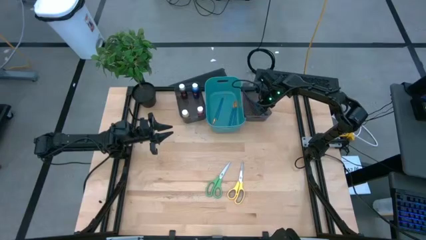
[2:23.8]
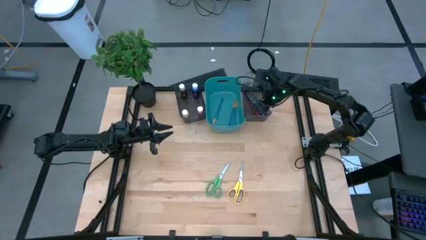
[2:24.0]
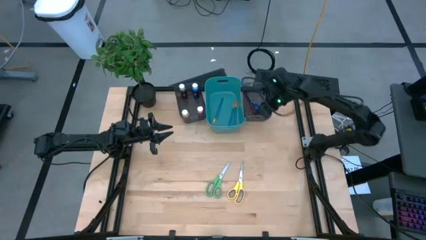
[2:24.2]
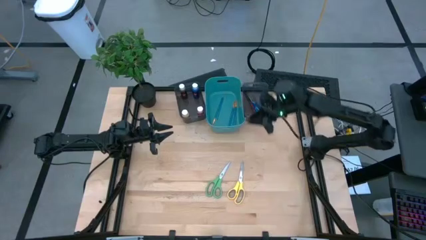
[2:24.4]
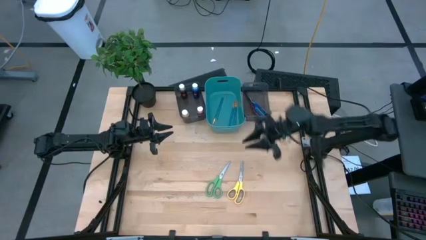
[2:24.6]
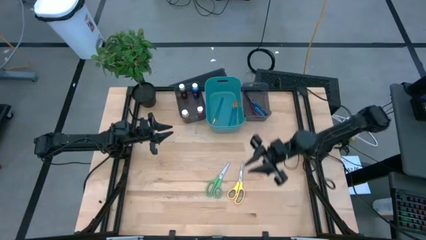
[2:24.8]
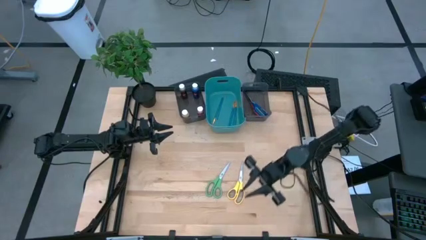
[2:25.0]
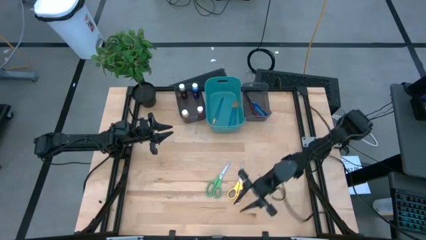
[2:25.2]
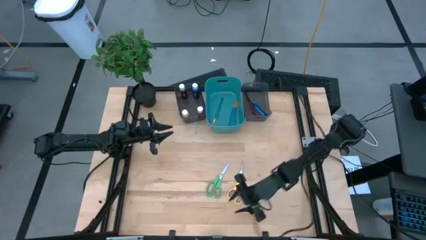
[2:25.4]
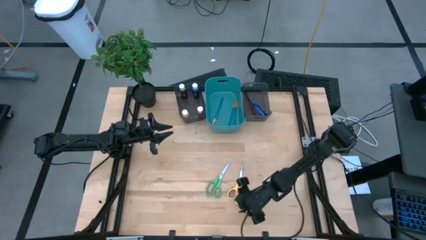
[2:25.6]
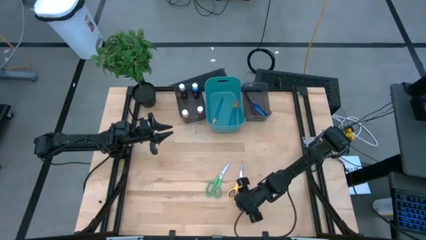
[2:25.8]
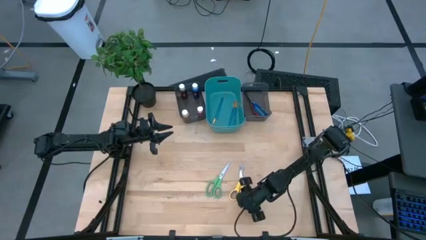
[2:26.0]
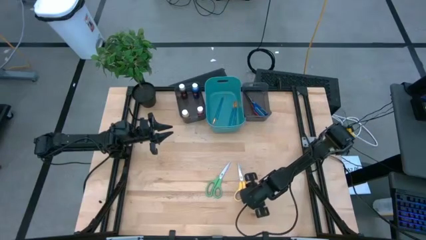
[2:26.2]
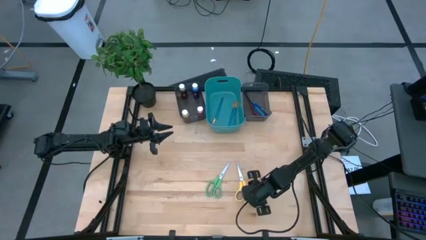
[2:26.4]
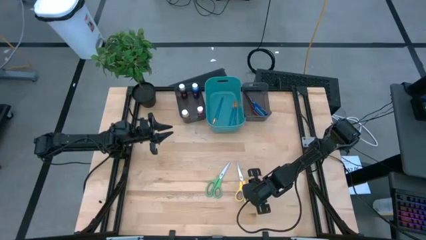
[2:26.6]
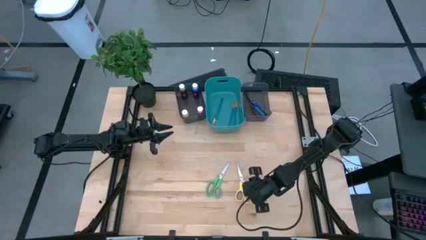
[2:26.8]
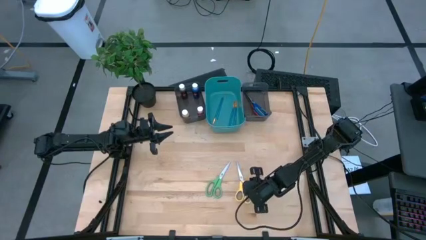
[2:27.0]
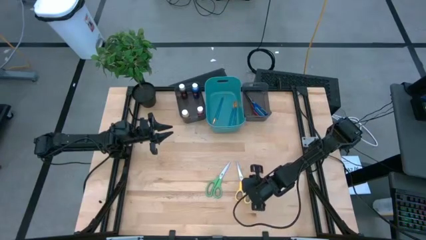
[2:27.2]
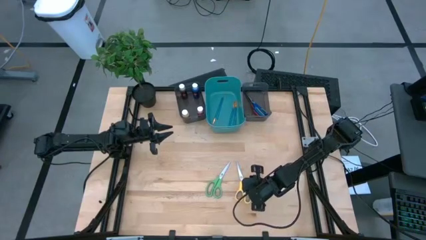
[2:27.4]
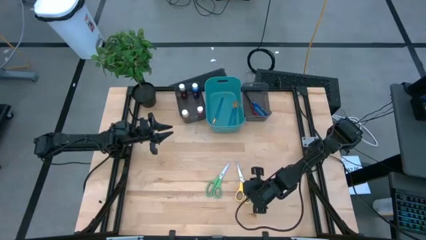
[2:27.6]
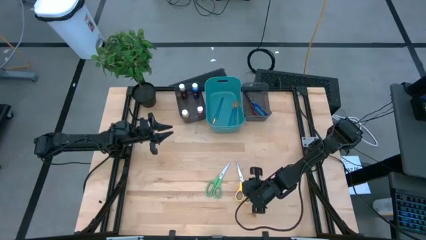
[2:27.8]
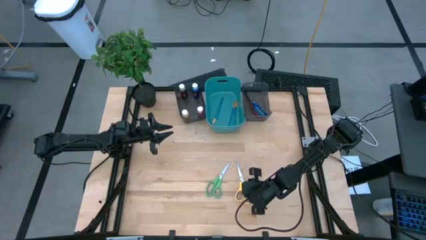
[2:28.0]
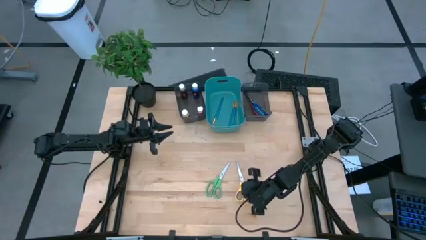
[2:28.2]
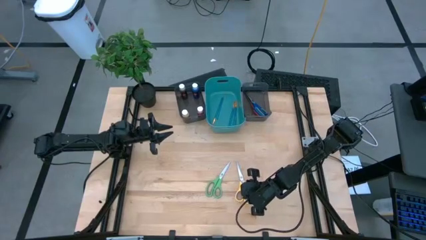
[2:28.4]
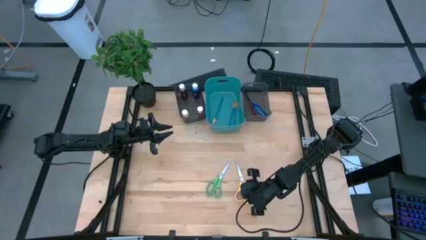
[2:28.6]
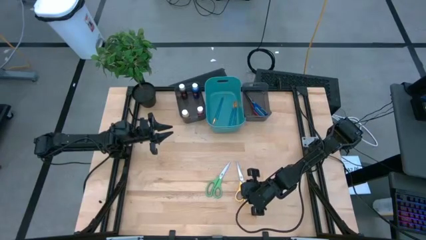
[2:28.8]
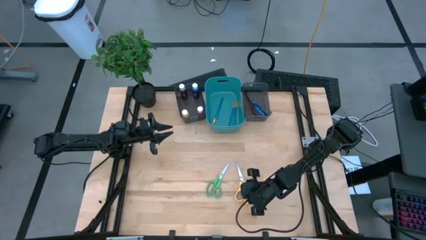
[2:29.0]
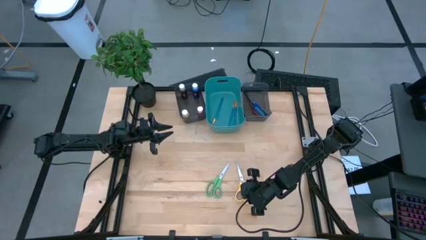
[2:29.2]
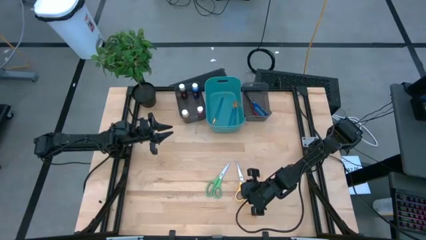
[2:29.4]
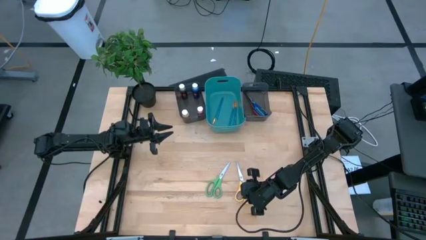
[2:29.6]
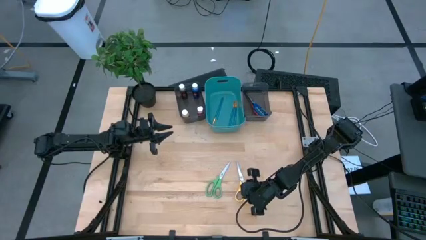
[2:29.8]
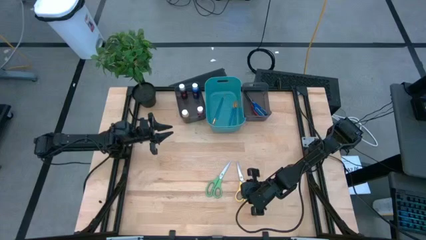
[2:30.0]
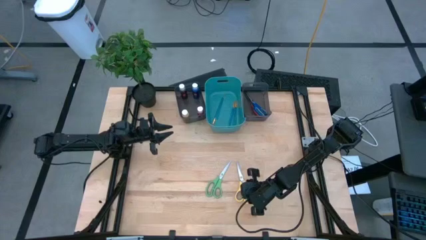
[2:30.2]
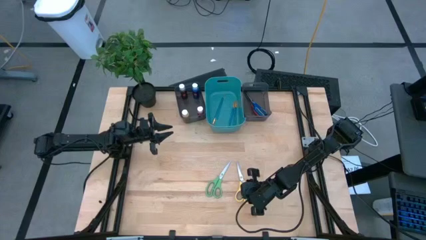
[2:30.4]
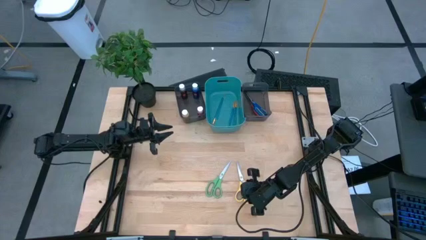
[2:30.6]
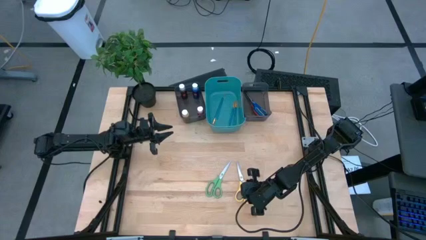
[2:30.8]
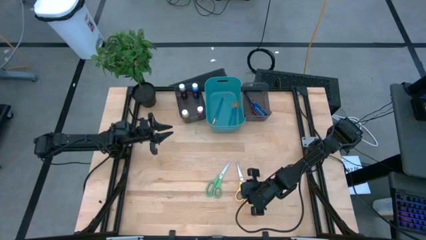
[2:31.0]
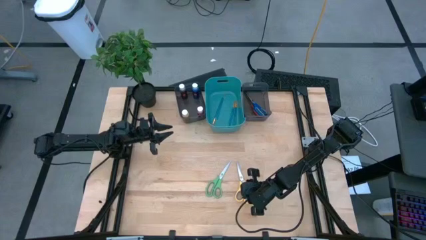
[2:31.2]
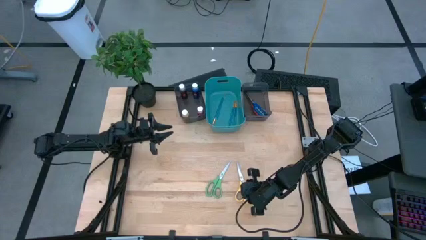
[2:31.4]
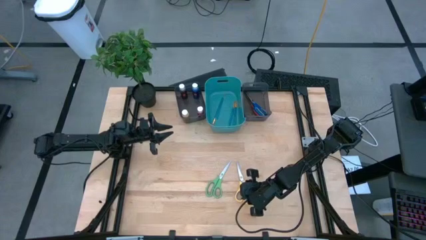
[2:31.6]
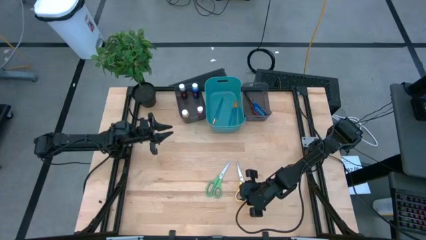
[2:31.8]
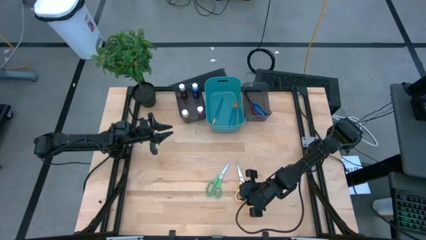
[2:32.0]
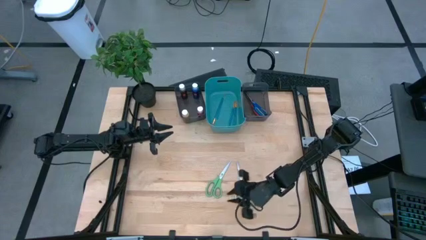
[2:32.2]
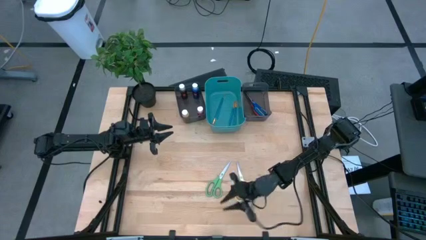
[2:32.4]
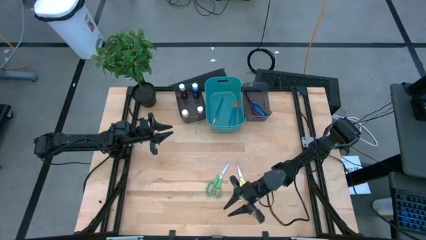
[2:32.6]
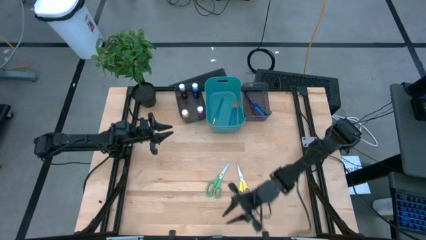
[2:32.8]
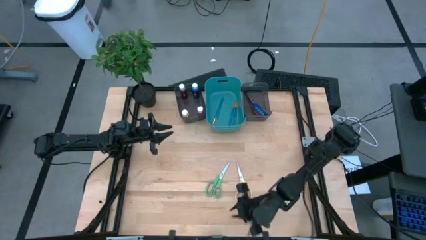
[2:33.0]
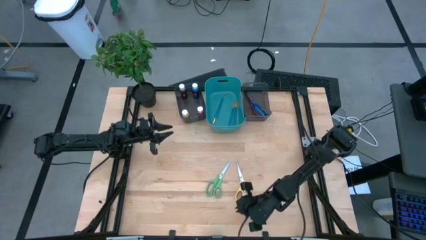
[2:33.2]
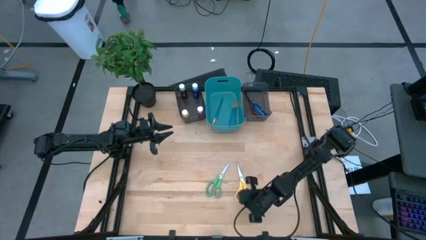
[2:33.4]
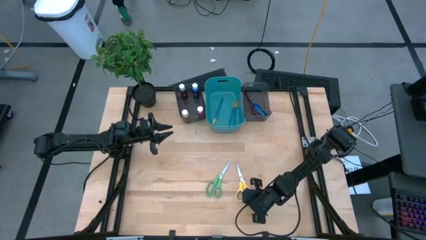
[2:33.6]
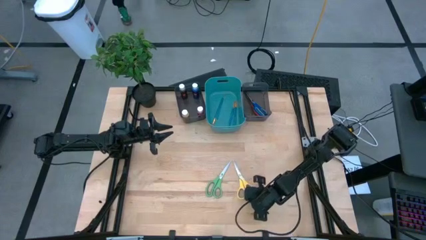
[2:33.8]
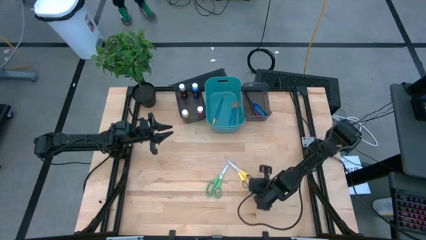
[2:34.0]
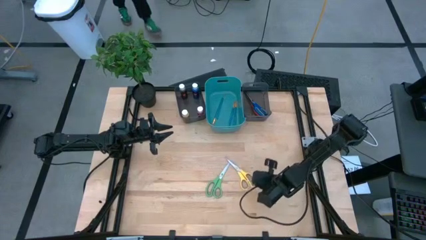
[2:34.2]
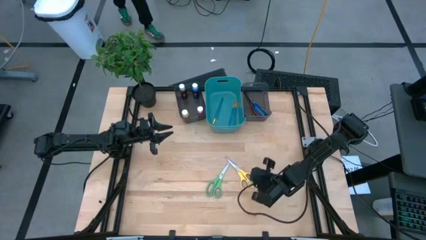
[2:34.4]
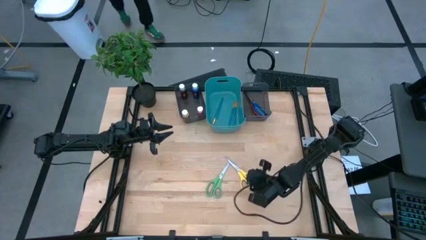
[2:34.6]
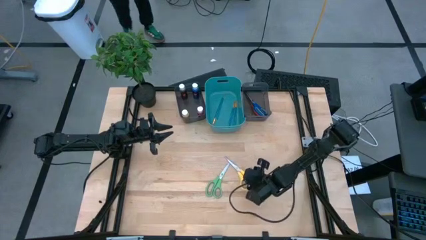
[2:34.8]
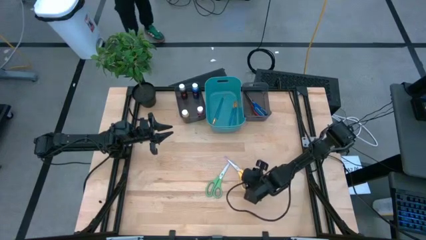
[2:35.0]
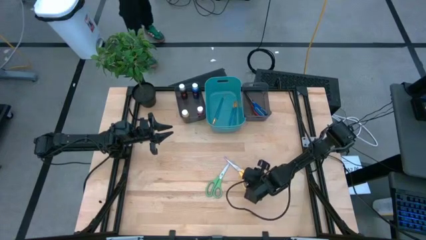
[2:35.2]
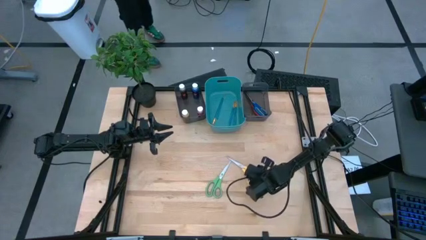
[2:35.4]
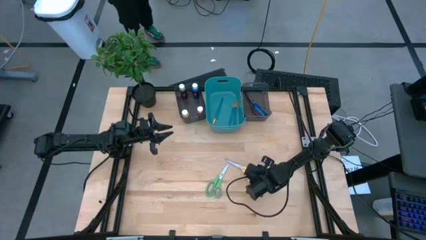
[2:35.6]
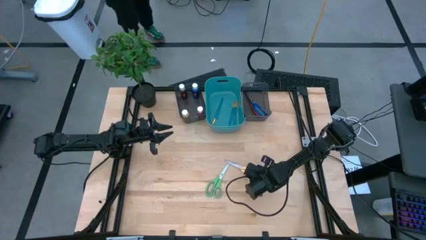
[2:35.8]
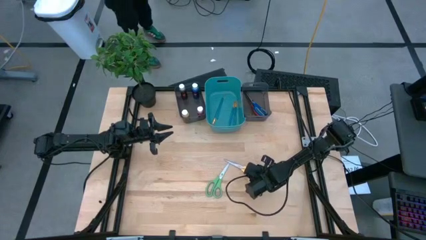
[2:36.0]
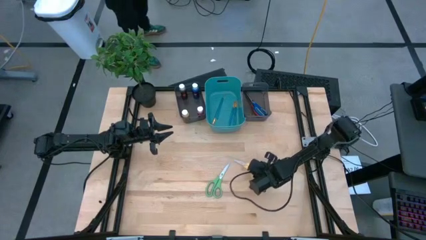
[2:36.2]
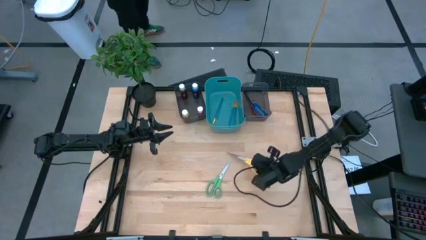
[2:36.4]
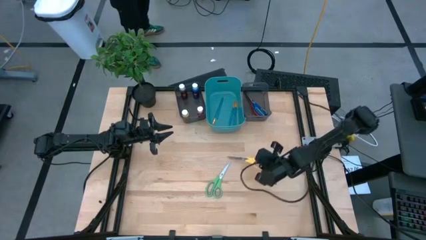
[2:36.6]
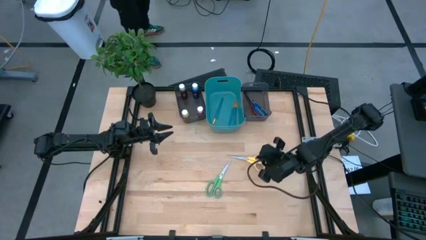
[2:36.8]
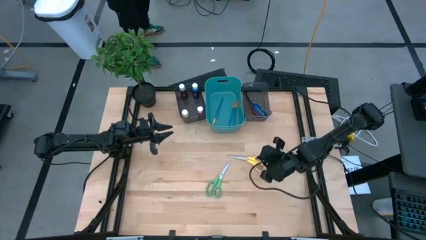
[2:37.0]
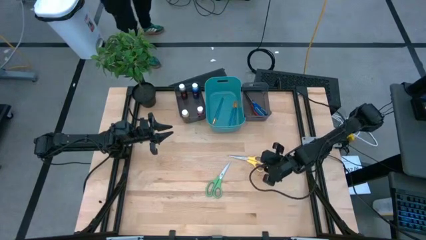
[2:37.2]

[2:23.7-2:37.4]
Task: Pick & Place Paint Supplies
Put the yellow scissor into the right black bin

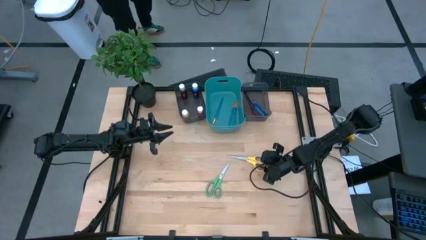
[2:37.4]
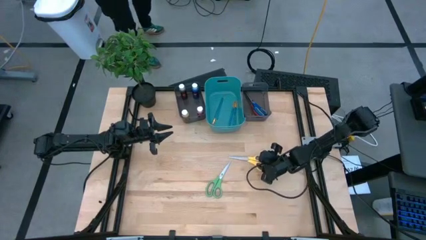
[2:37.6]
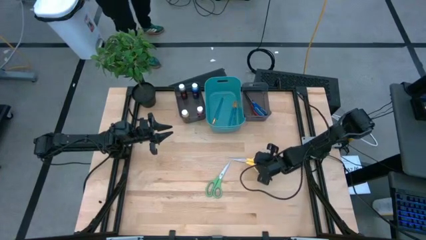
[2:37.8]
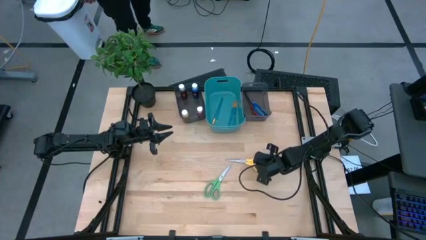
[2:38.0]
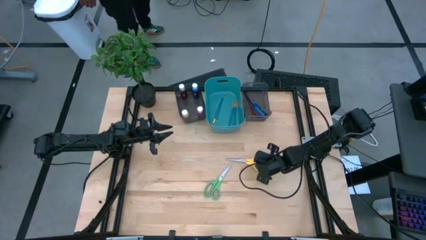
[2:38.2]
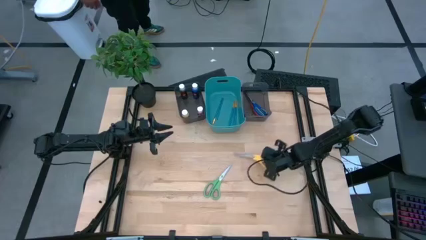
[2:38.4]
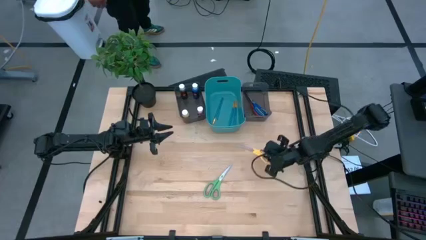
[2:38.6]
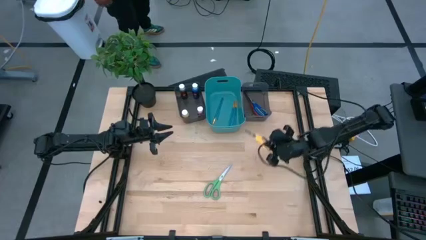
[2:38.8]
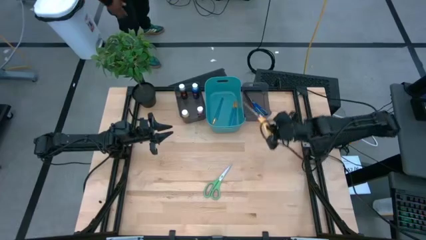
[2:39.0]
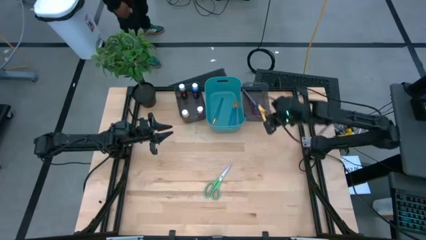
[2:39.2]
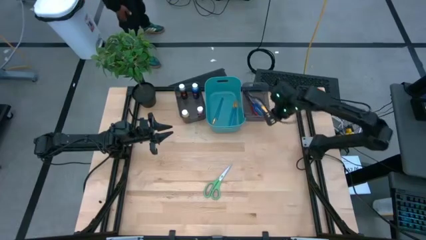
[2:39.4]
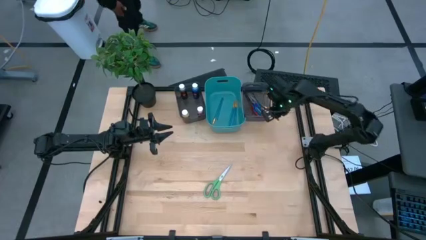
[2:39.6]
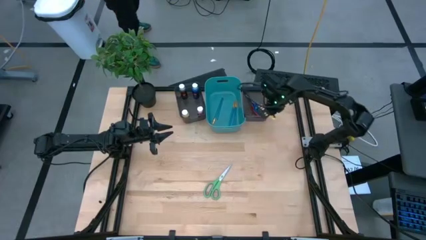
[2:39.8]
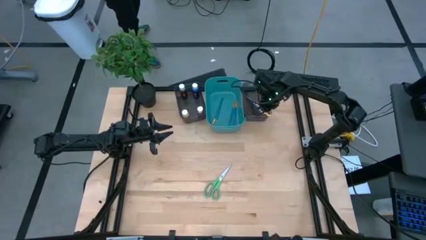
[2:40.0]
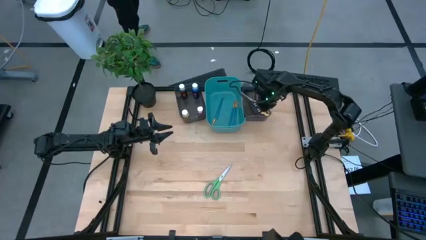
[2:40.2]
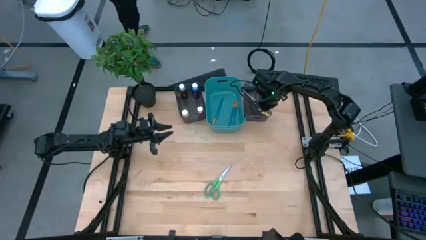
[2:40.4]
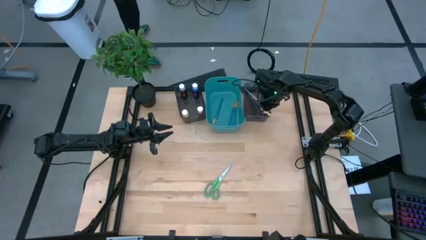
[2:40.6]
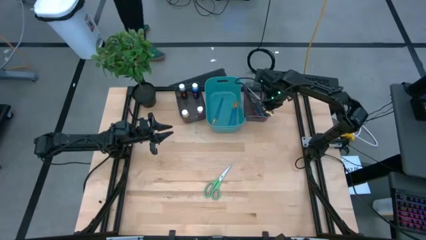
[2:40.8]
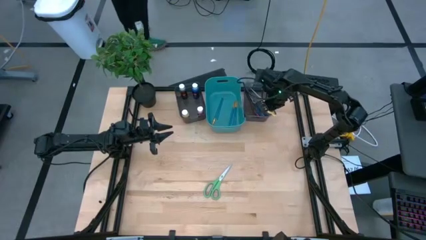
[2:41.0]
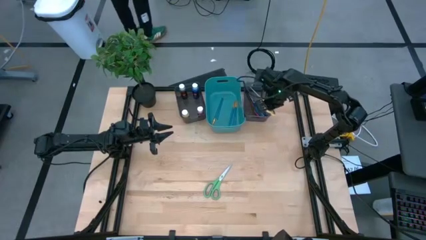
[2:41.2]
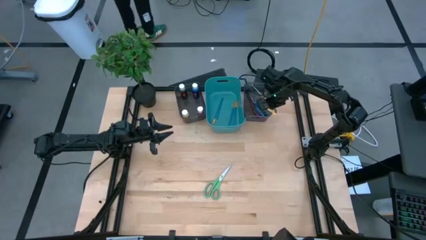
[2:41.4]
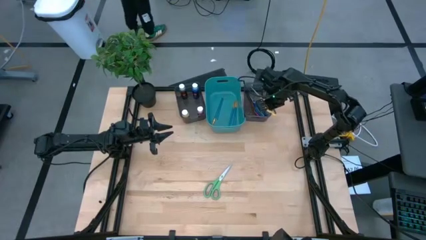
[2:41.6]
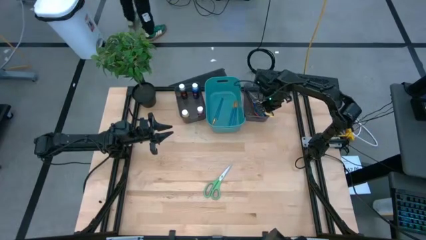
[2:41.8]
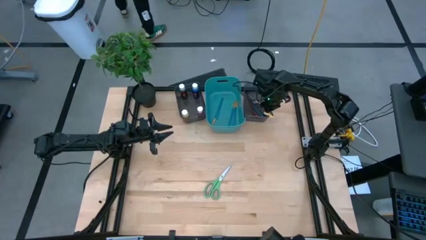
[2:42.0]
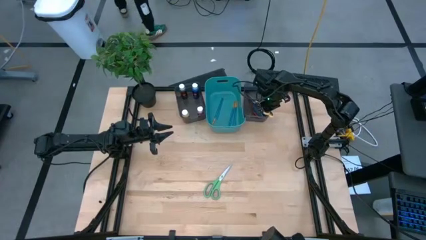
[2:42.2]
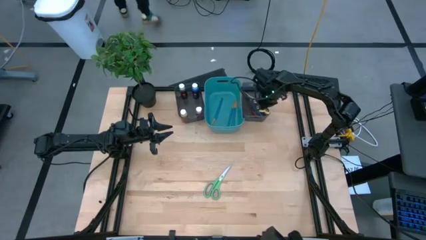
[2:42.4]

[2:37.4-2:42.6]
Put the yellow scissor into the right black bin
